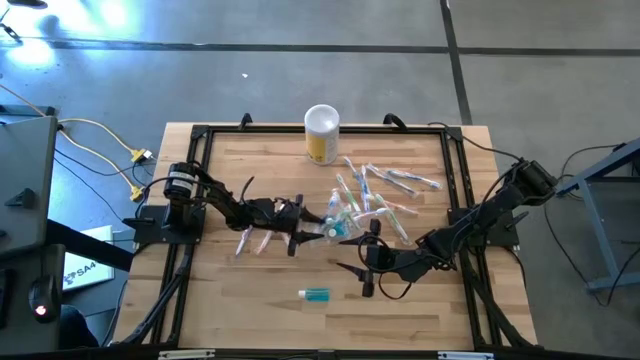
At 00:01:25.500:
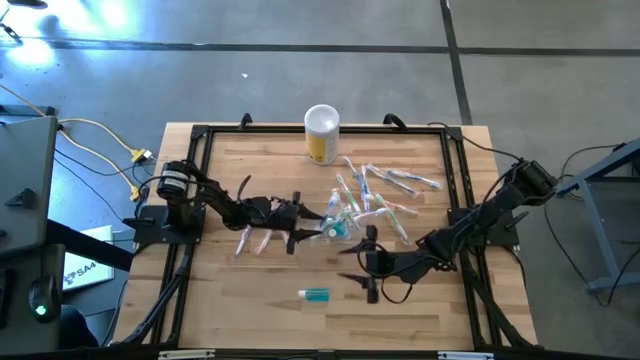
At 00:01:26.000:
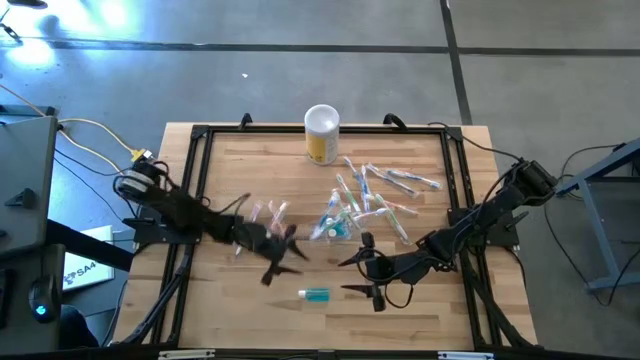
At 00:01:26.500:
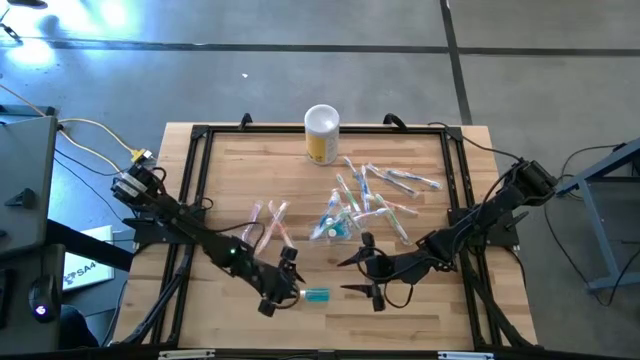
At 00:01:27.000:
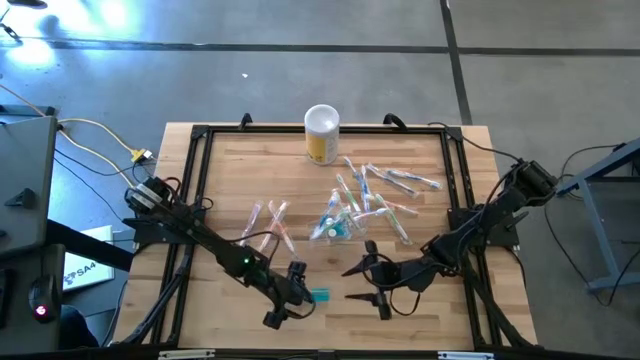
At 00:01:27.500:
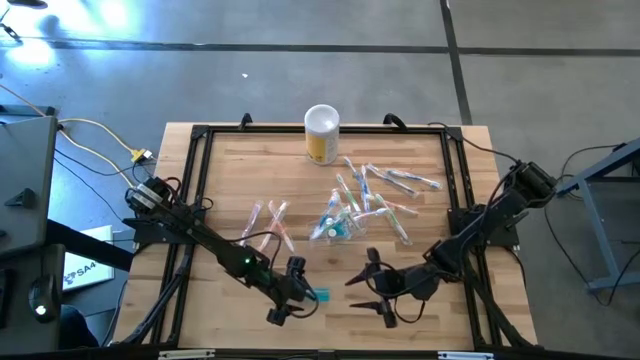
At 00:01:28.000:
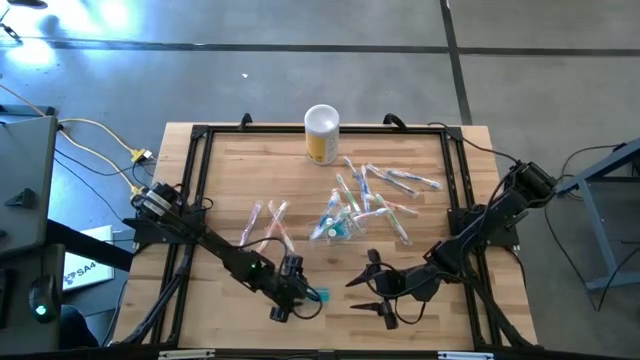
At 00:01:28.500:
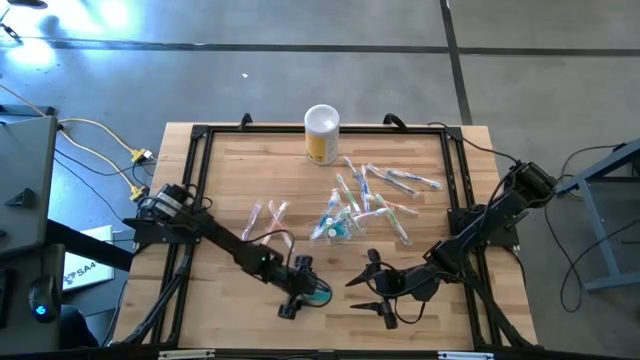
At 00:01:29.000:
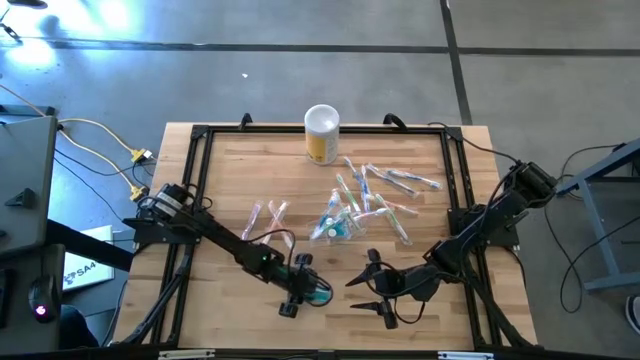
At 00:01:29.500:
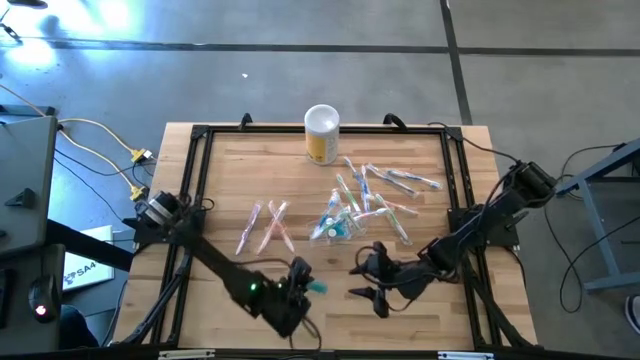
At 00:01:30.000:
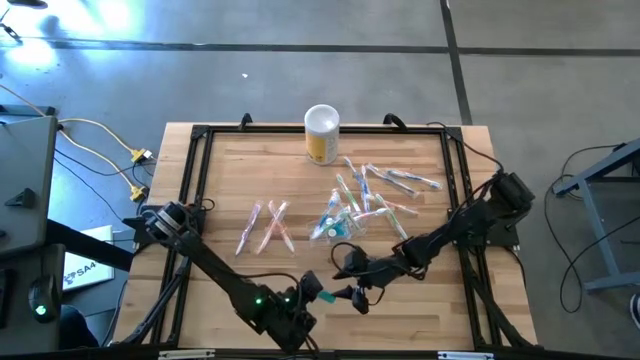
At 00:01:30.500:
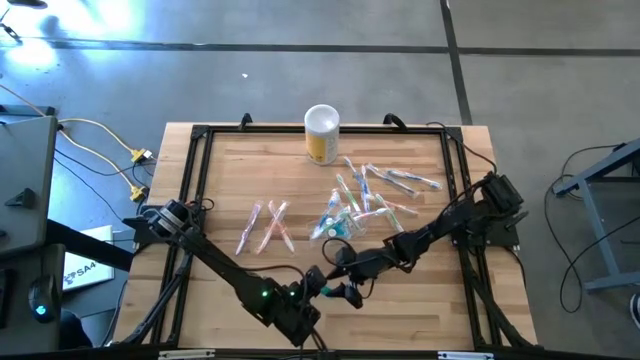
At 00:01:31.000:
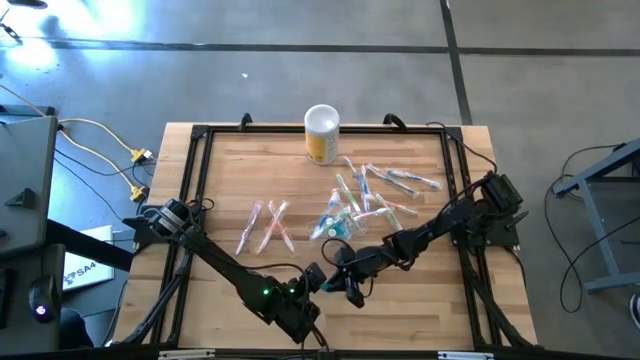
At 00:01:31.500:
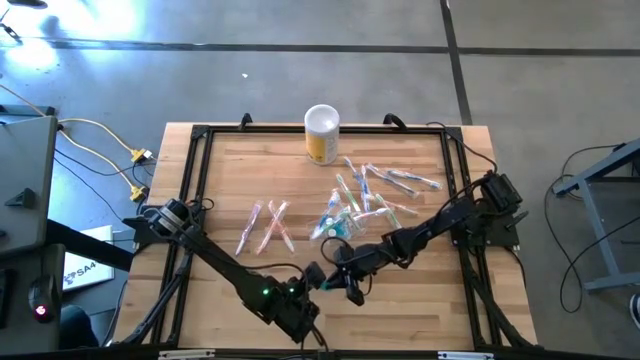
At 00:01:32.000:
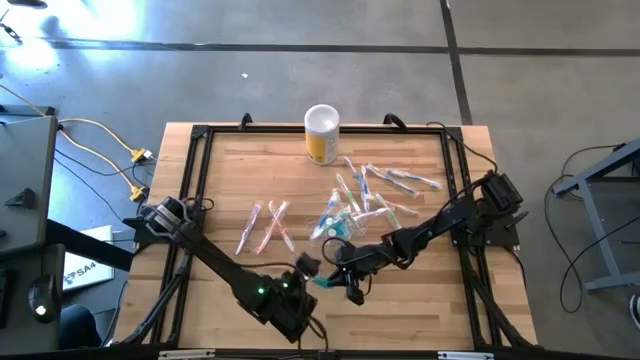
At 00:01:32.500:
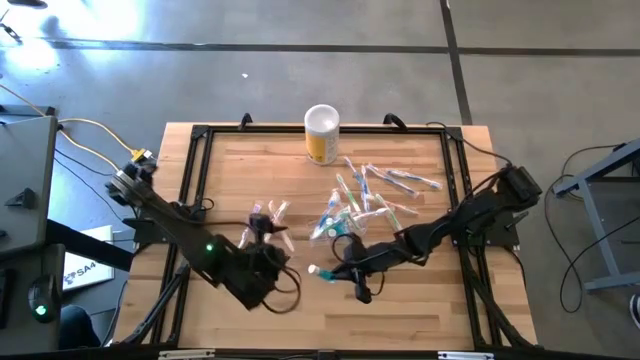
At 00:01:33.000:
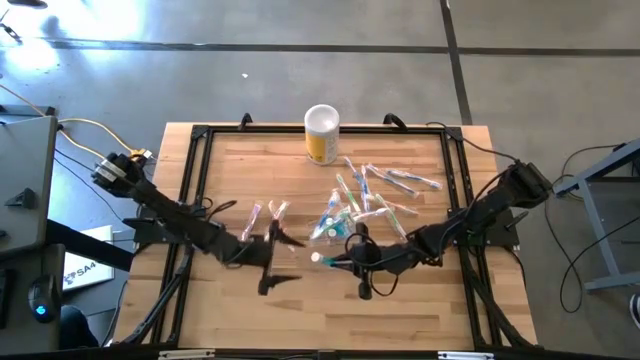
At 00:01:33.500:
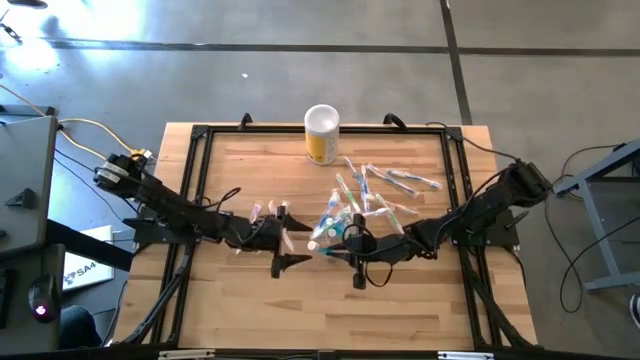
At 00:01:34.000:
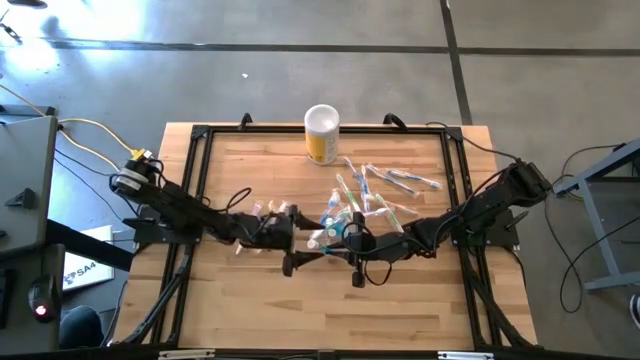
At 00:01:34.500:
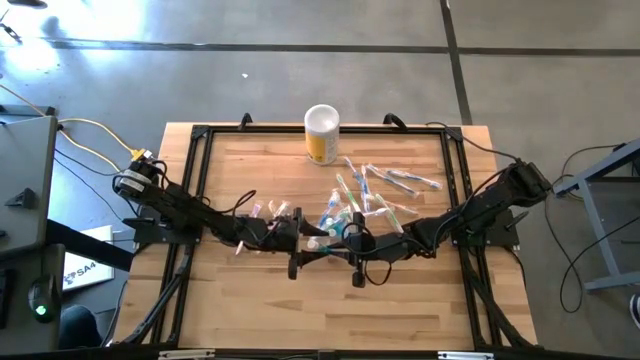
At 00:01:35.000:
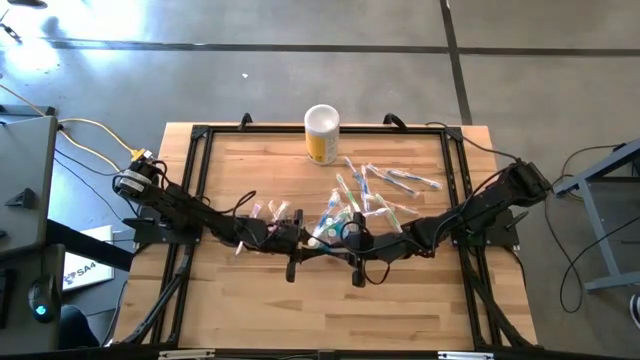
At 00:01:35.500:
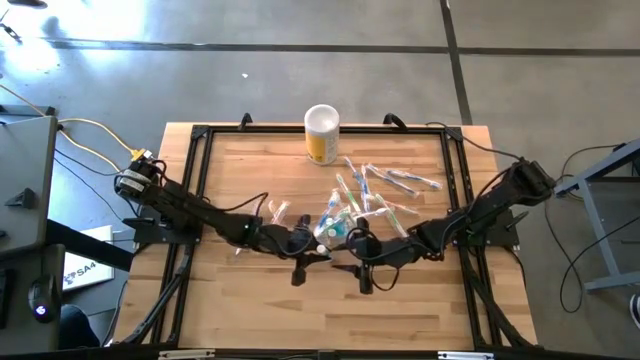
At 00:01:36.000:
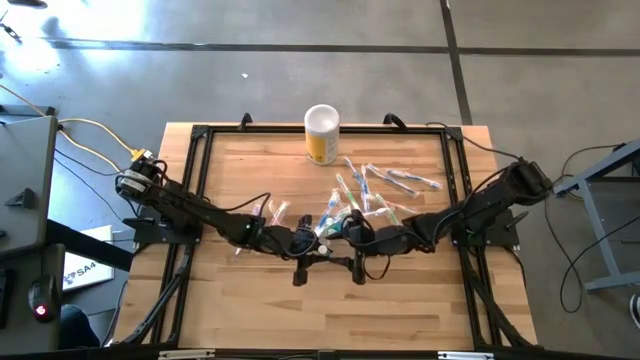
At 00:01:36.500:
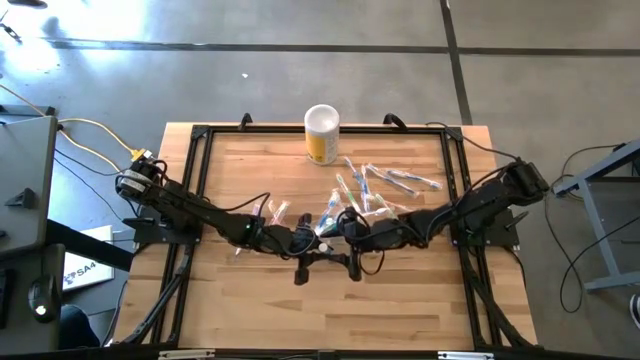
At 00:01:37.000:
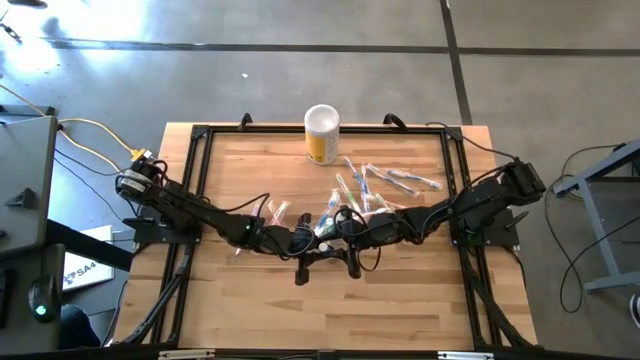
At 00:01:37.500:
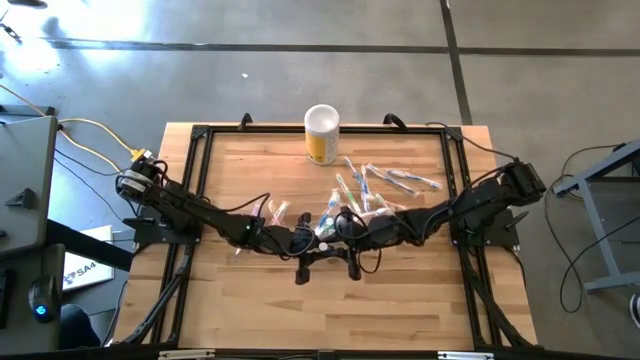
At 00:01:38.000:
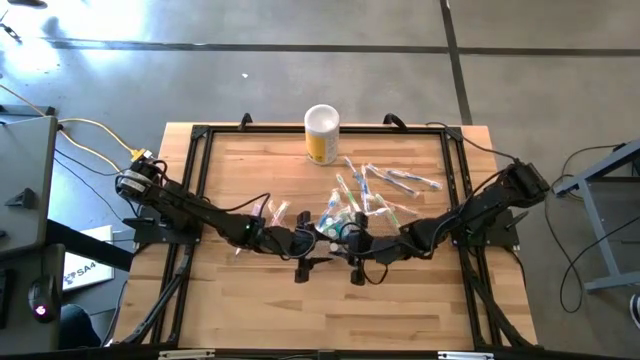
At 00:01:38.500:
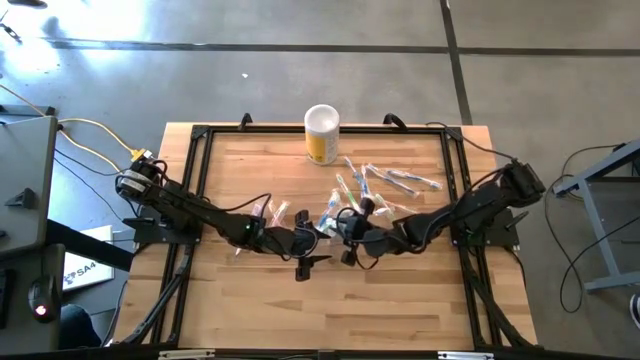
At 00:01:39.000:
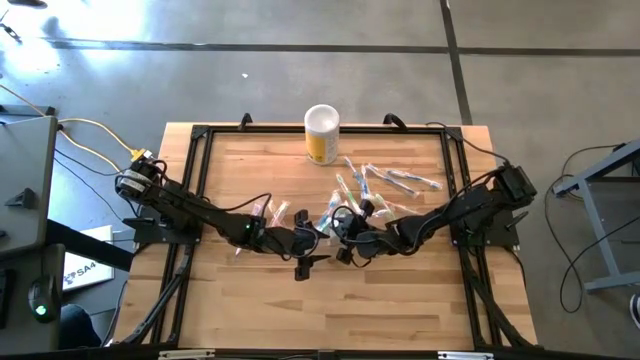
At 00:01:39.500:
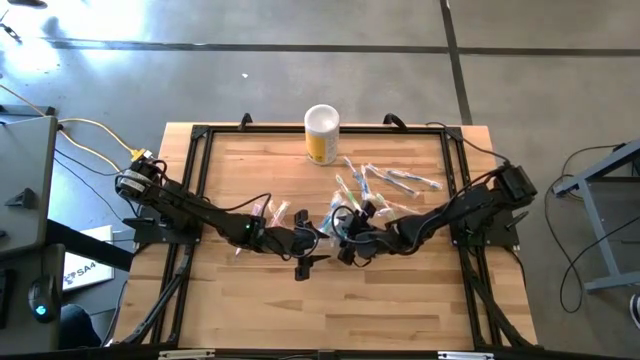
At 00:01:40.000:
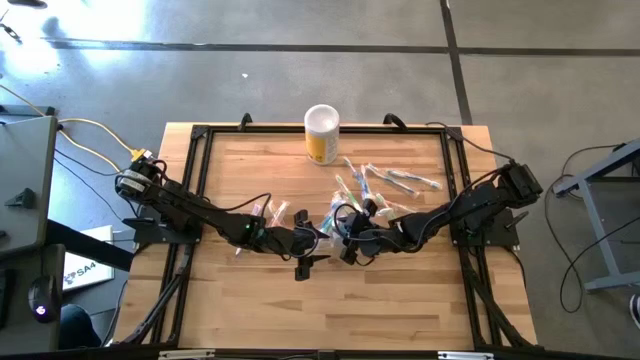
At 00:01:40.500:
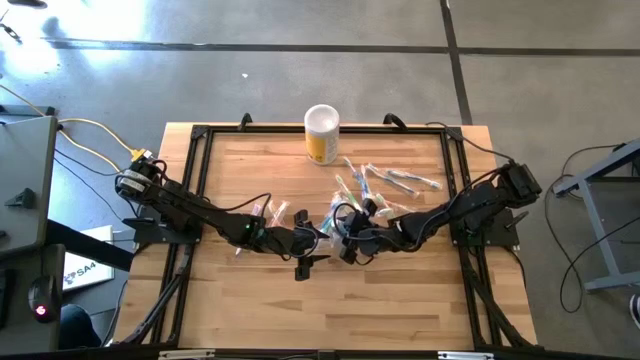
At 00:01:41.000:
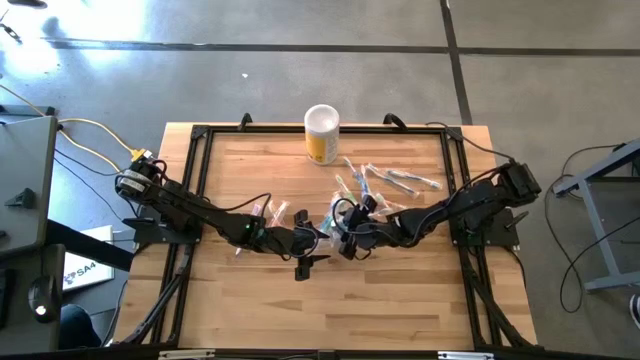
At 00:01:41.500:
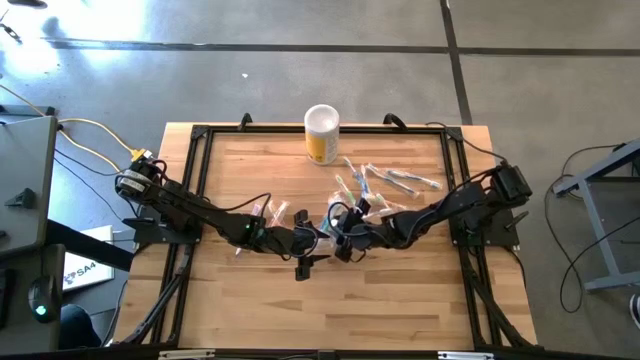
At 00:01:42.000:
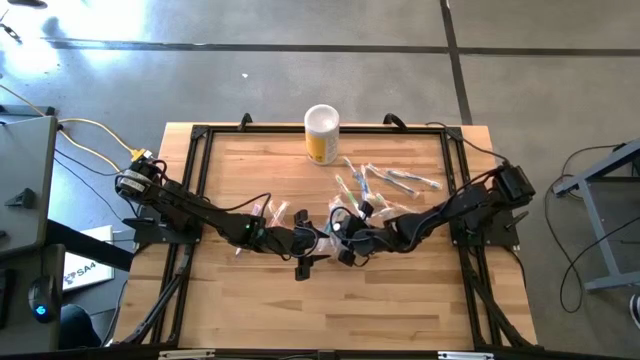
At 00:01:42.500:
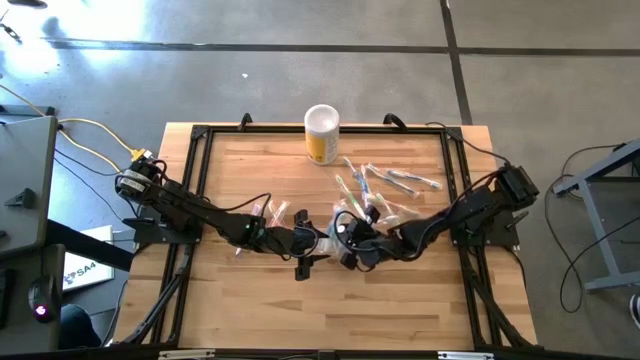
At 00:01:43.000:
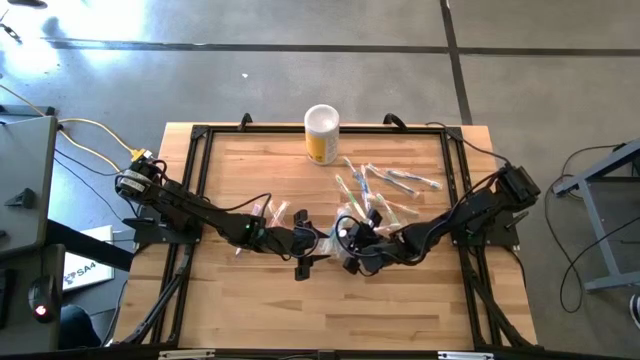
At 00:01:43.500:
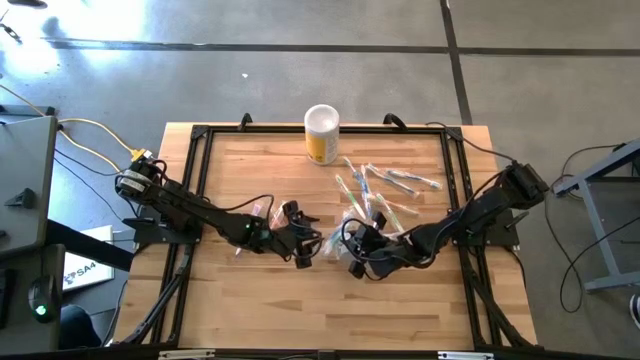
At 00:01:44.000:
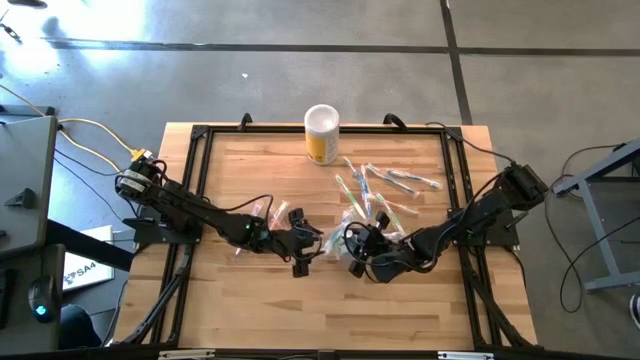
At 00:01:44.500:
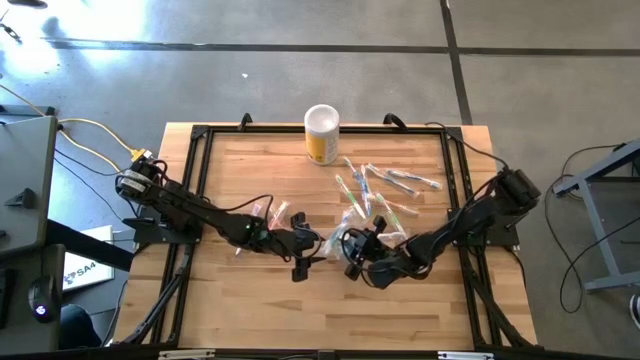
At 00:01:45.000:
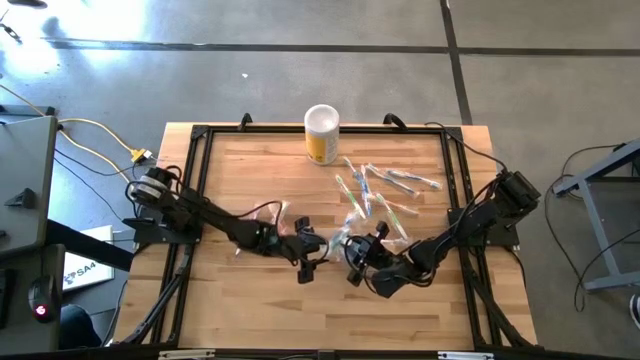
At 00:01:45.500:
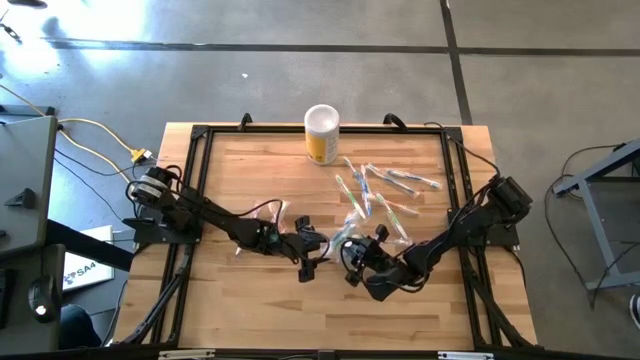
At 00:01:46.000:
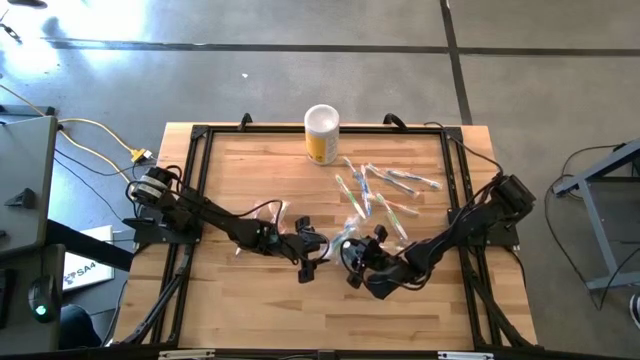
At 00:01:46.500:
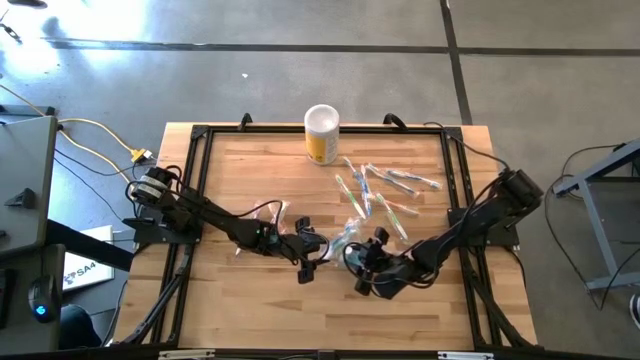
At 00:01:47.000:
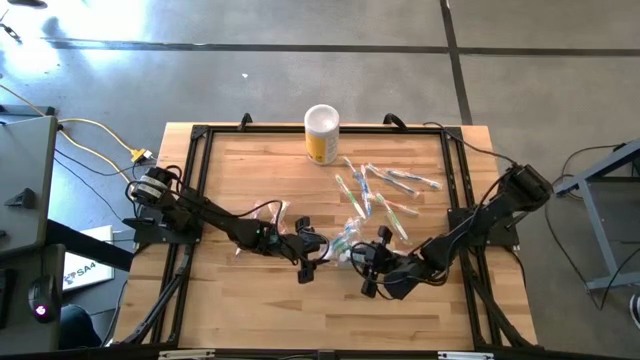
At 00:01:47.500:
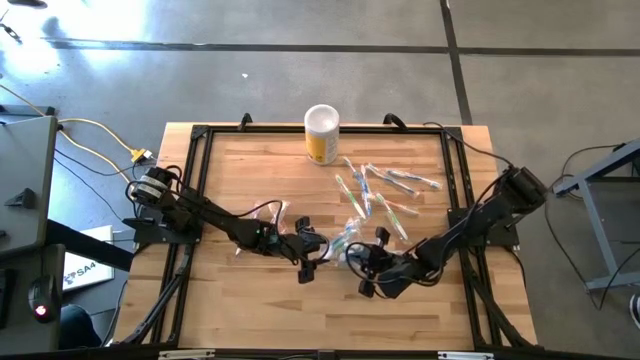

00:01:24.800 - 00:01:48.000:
Task: Pick & Place toothbrushing station
Put the blue mouthwash in the transparent organizer
